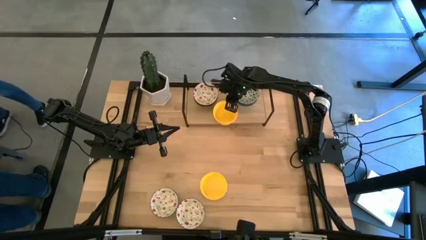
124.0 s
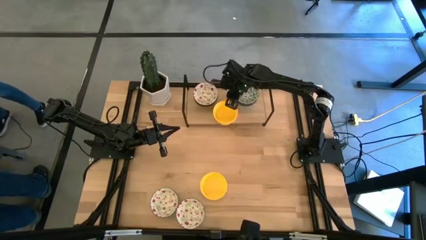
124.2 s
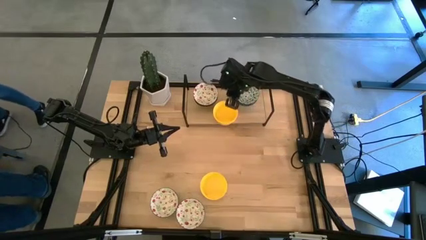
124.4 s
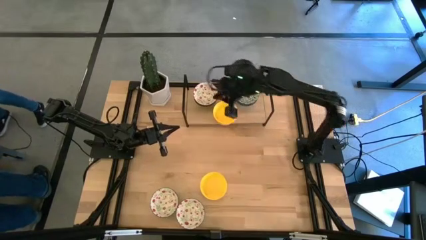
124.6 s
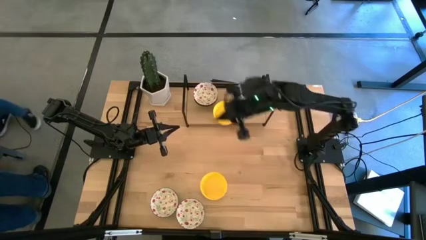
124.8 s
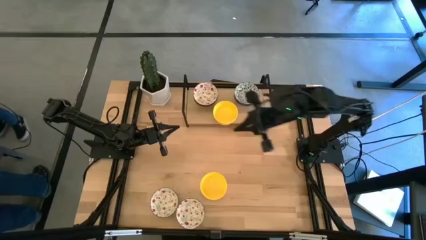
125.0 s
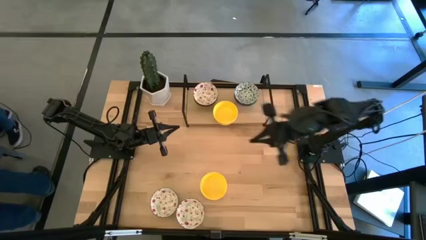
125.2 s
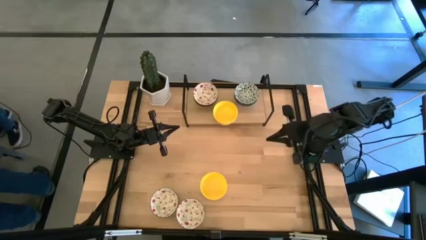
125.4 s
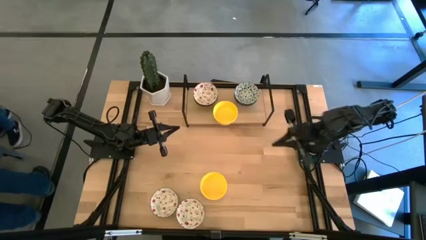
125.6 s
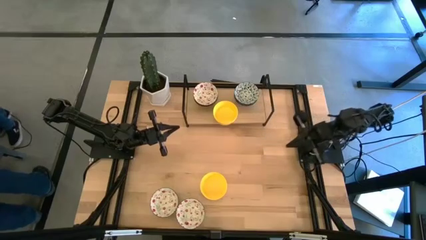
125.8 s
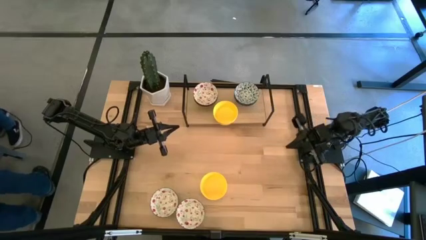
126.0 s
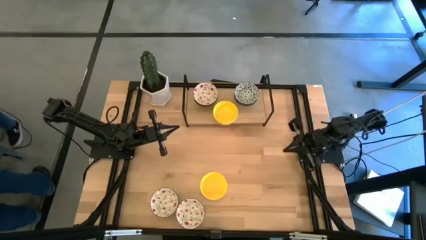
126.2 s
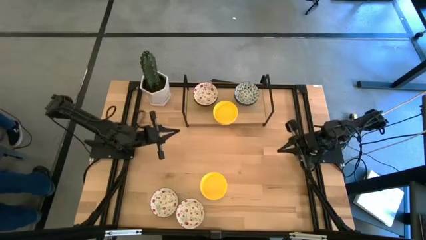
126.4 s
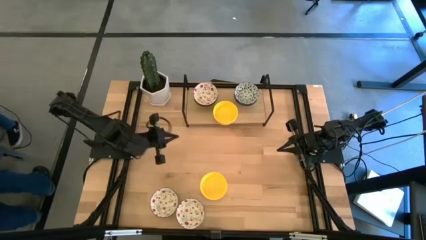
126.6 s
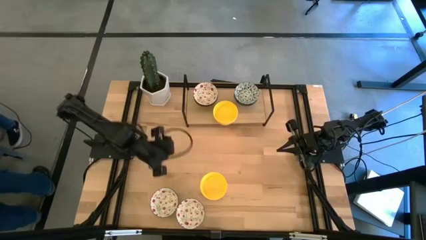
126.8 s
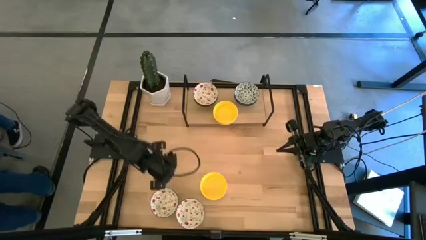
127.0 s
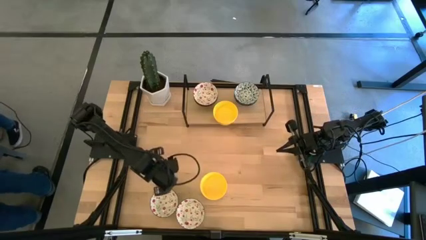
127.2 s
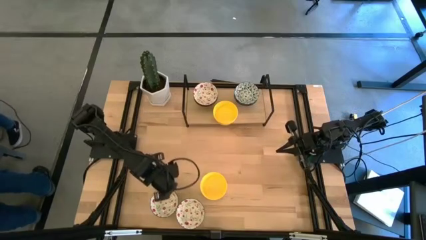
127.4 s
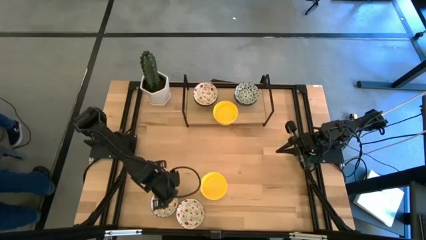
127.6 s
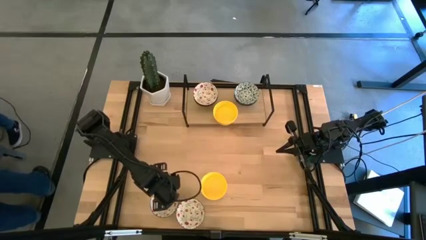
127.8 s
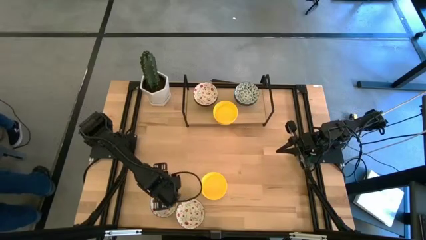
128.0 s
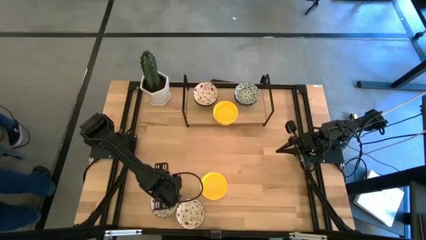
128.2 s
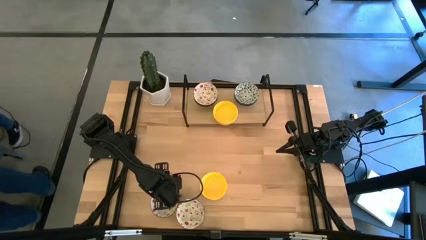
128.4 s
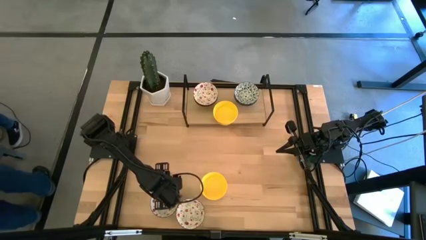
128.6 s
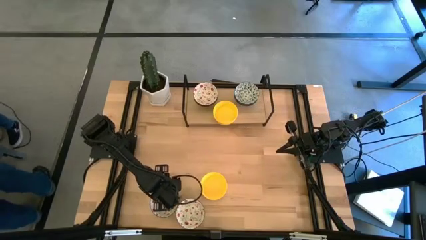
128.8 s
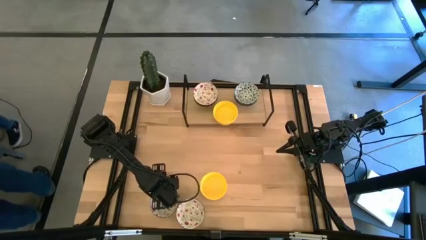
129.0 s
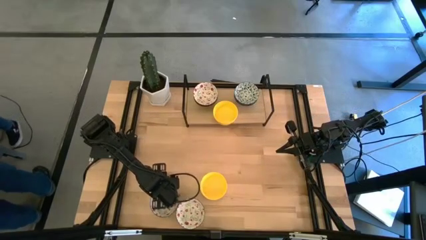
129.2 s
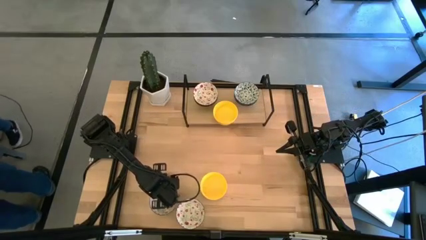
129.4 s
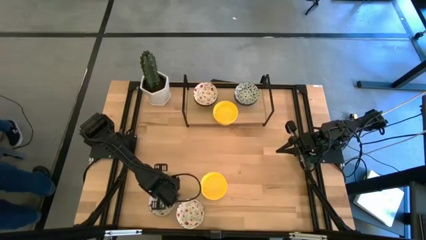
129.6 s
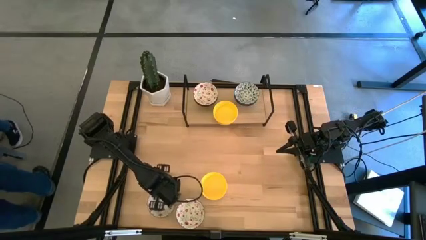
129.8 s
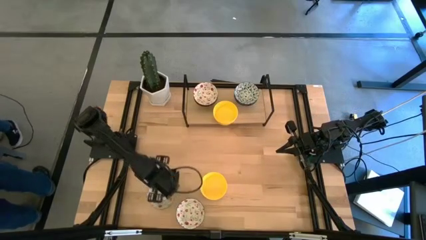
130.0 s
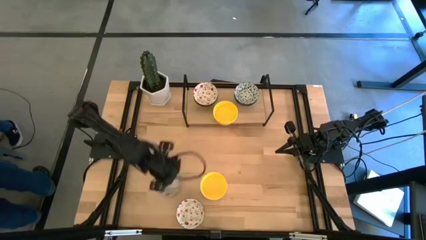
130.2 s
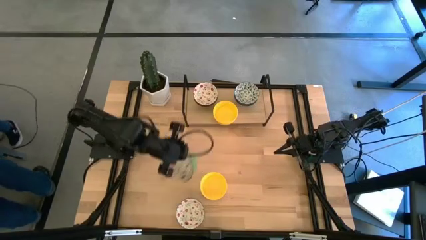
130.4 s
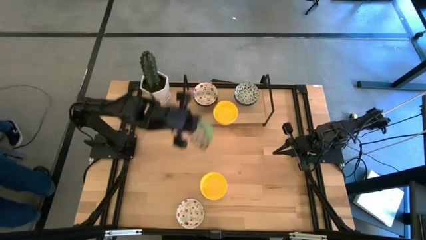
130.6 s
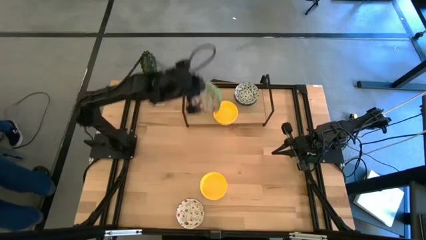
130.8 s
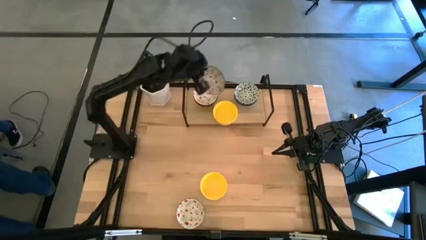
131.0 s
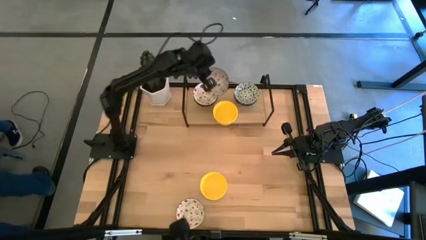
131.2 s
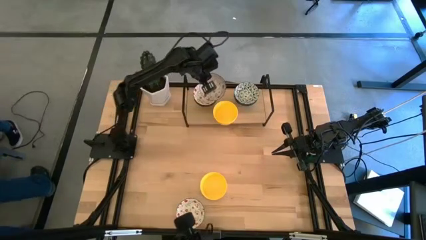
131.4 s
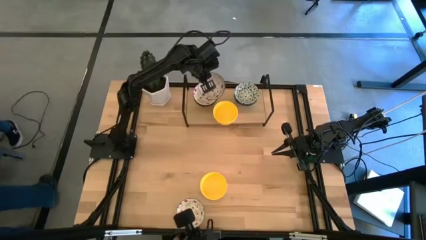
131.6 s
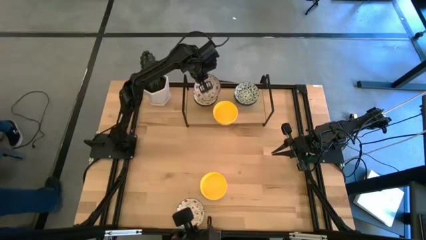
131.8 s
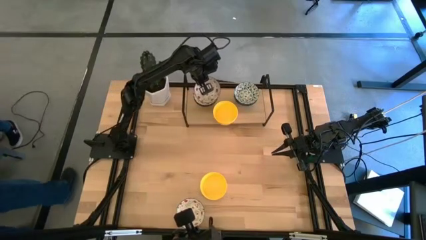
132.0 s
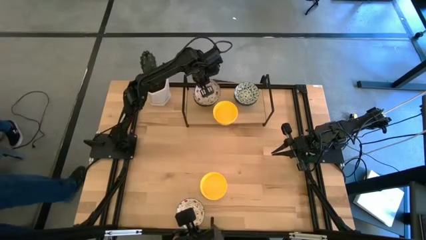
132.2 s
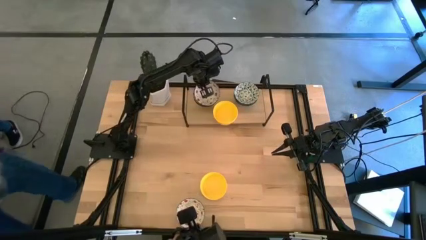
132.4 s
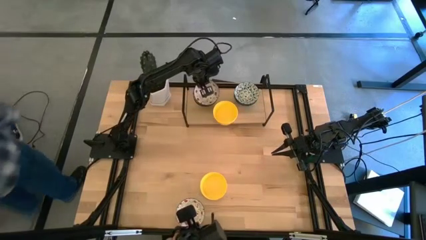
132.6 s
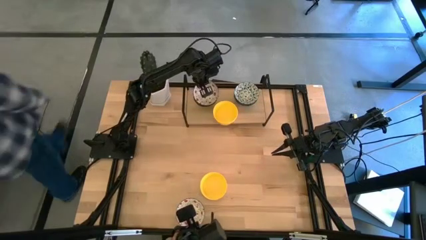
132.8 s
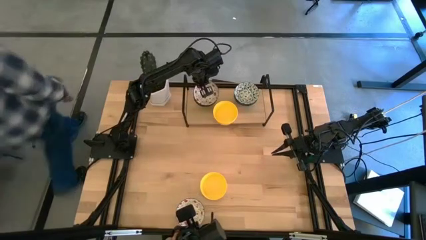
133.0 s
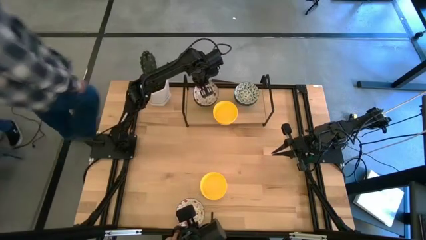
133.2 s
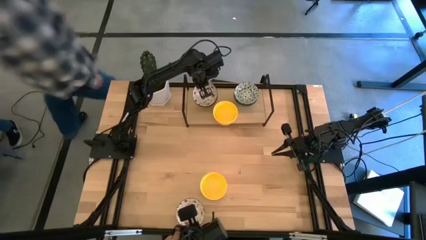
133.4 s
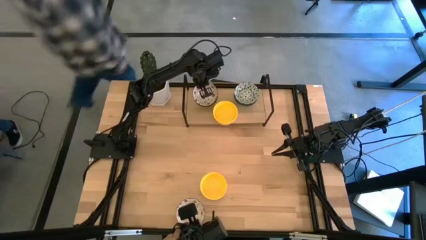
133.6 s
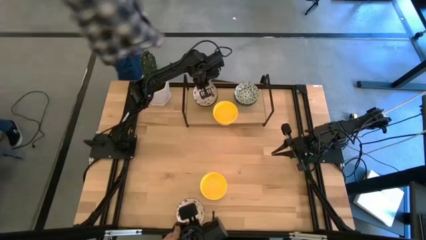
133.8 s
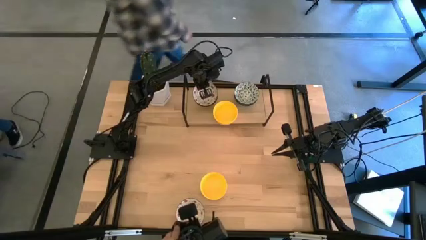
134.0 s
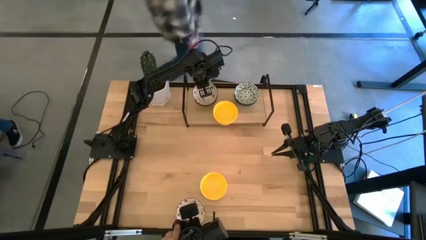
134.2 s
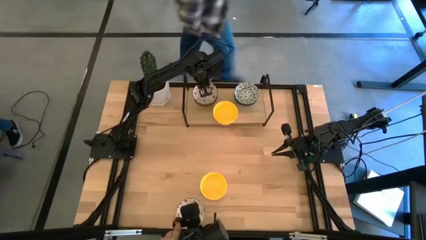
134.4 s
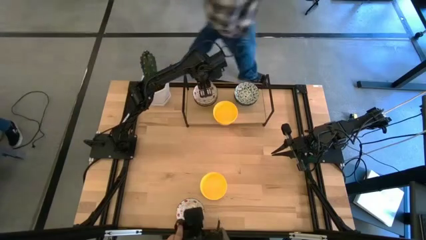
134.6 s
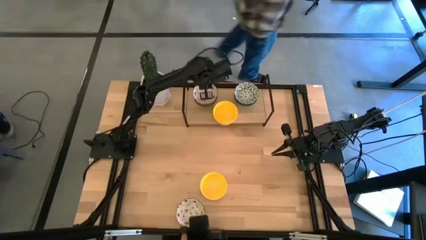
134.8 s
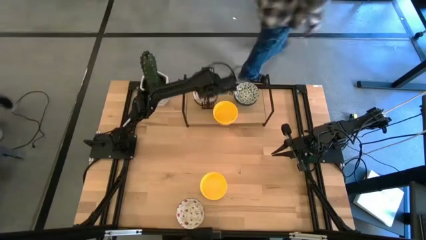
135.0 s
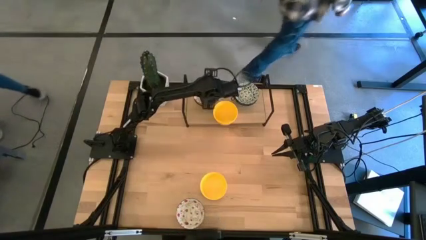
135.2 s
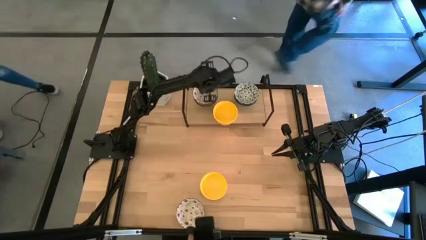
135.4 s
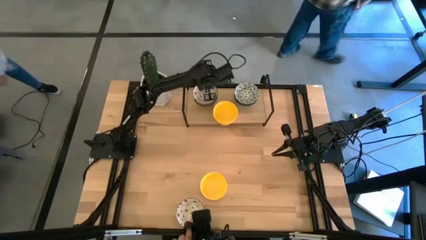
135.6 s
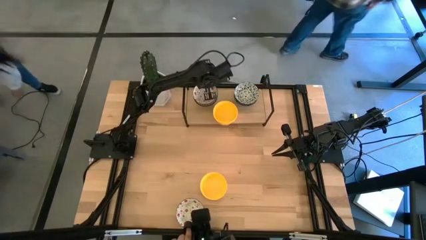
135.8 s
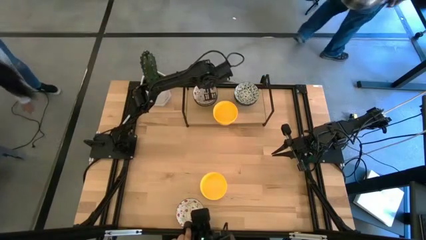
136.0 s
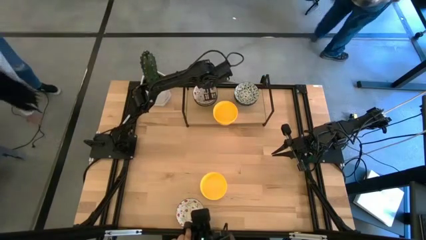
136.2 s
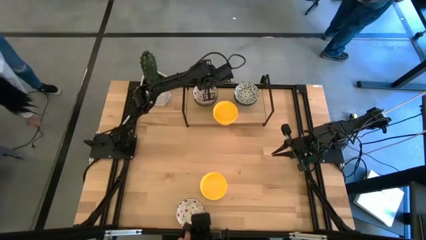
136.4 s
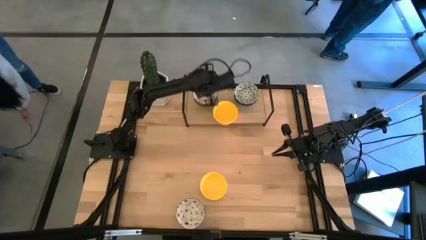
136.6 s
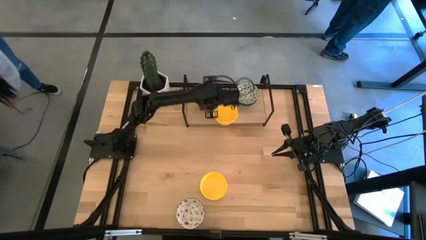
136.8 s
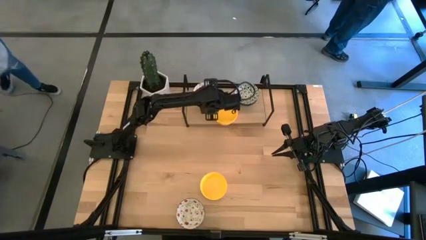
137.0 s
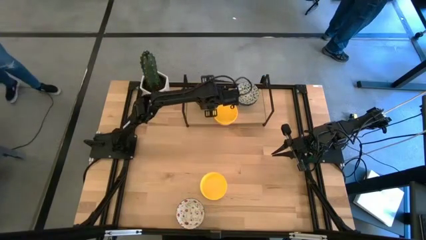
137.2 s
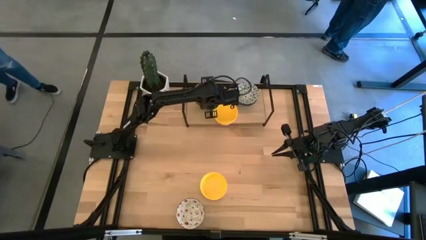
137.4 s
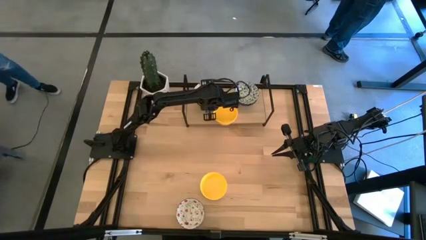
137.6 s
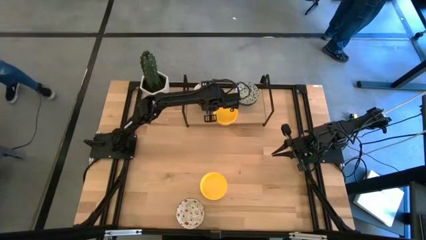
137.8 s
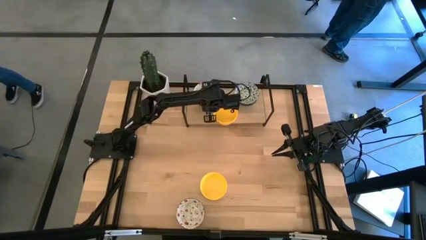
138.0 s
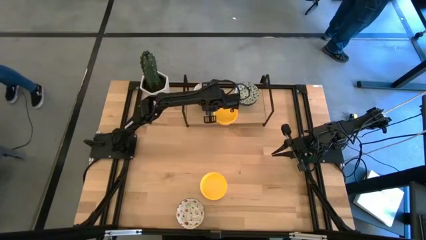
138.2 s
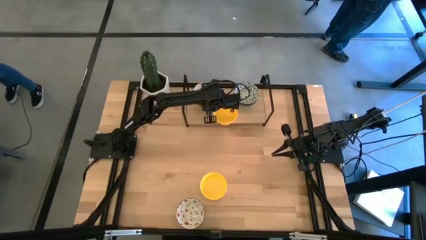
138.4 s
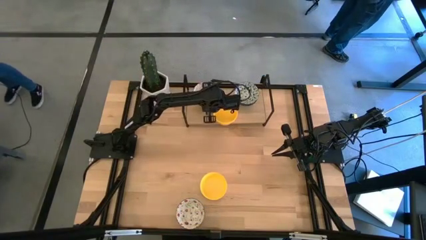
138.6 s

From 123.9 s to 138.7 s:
Task: Pick & Place Mini bowls
Stack the left green bowl on top of the green bowls on the shelf

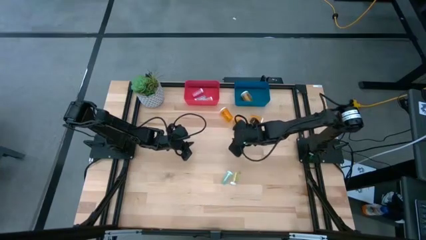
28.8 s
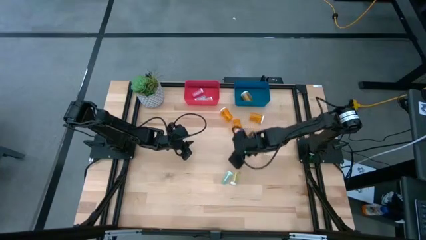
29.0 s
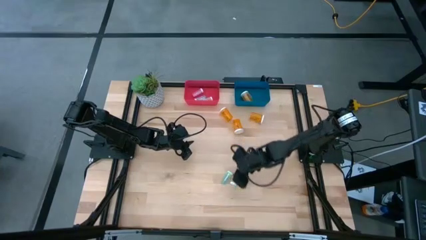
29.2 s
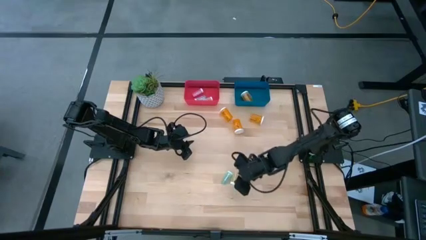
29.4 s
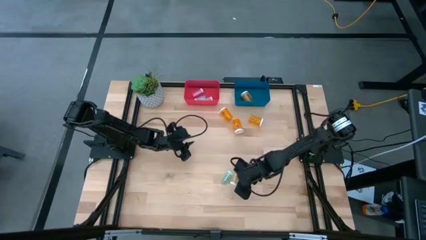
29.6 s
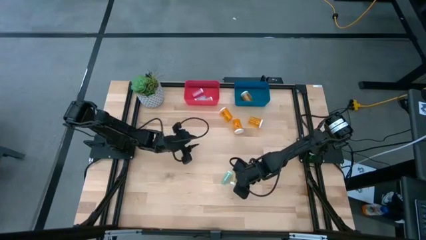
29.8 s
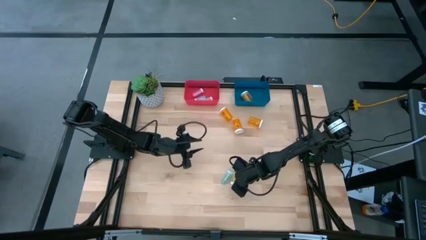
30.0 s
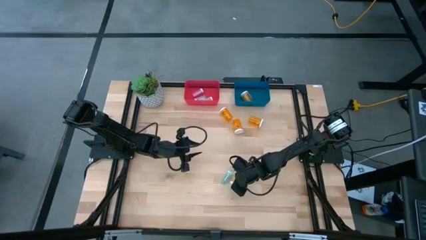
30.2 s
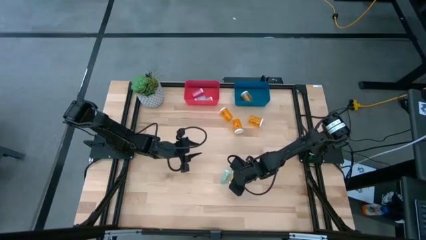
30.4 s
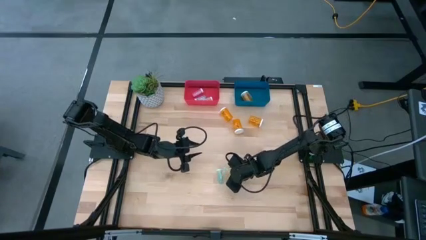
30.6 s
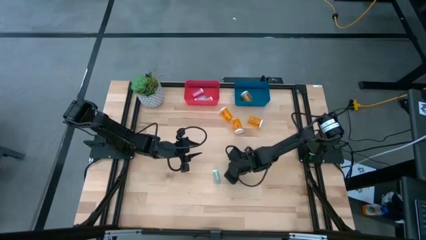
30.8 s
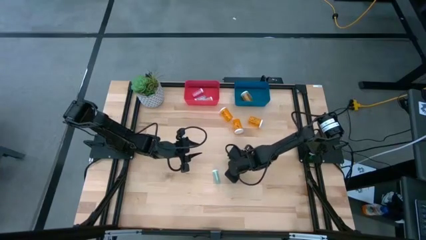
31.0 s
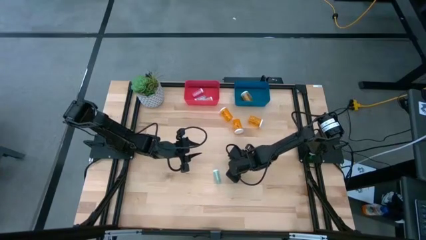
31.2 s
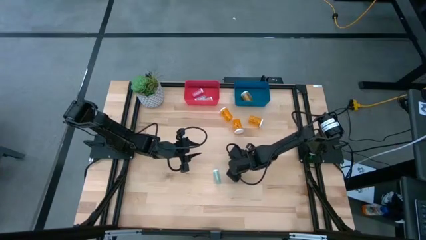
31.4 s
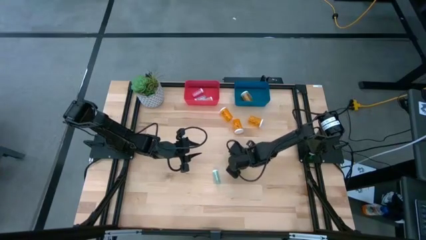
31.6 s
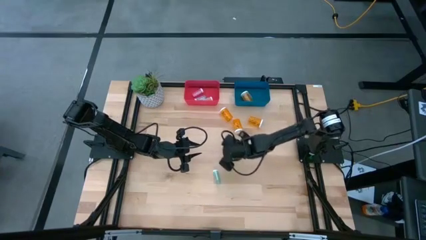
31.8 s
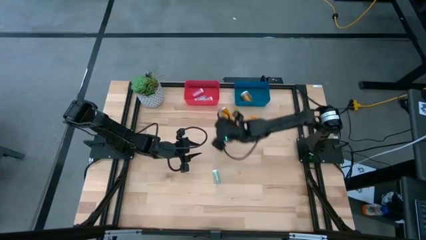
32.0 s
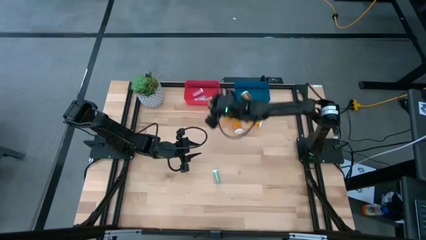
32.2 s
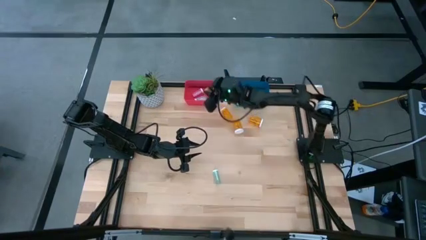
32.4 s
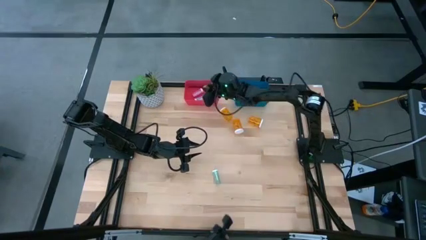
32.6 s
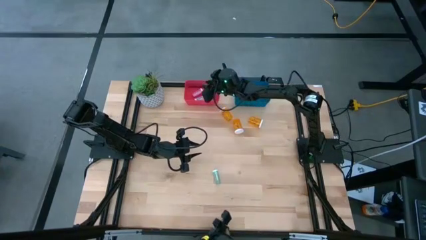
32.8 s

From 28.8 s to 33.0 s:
Task: Pick and place medicine bottles into bin by pill shape (circle, oval)
Put the yellow pill bottle into the red bin
